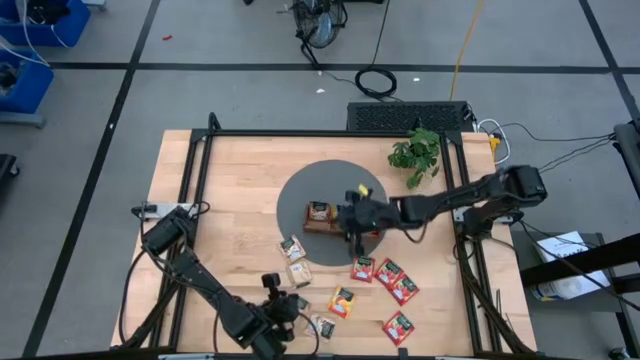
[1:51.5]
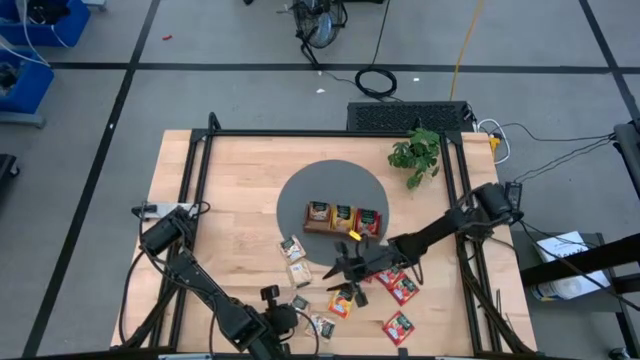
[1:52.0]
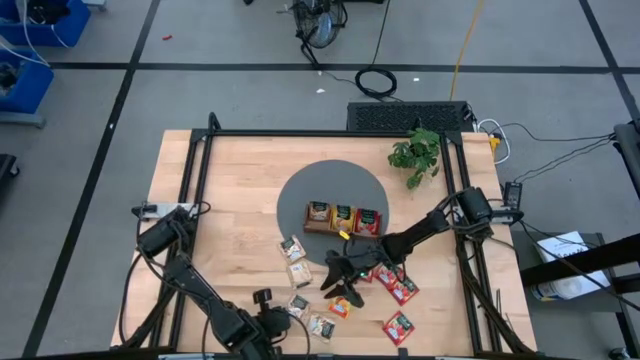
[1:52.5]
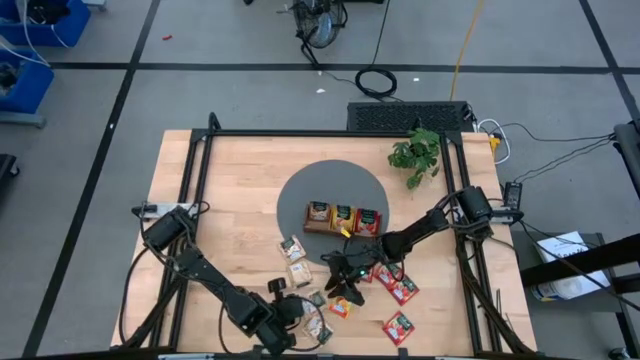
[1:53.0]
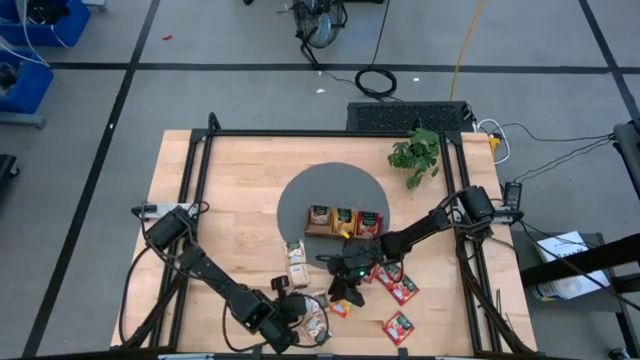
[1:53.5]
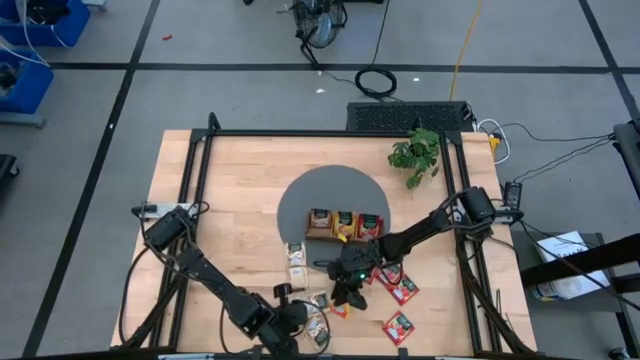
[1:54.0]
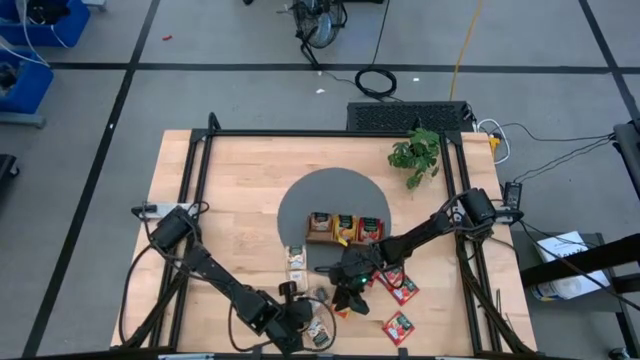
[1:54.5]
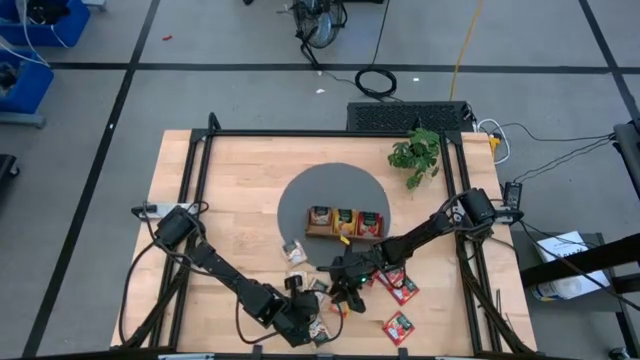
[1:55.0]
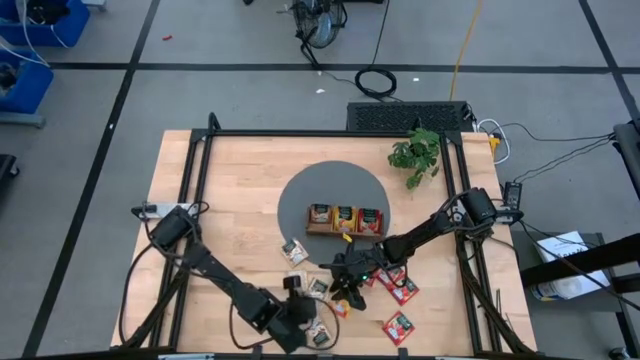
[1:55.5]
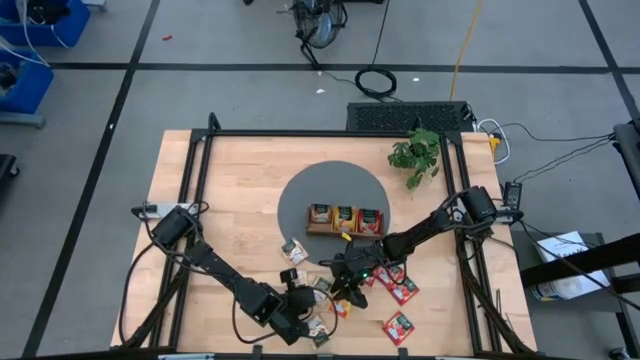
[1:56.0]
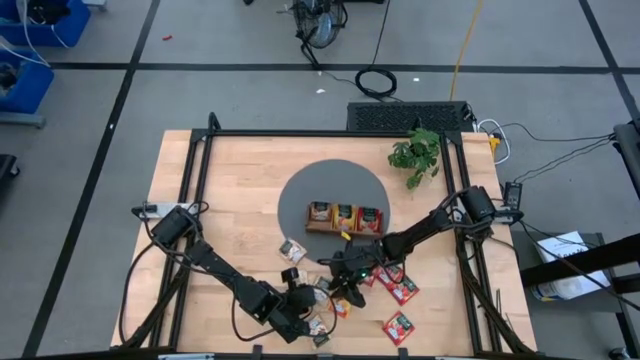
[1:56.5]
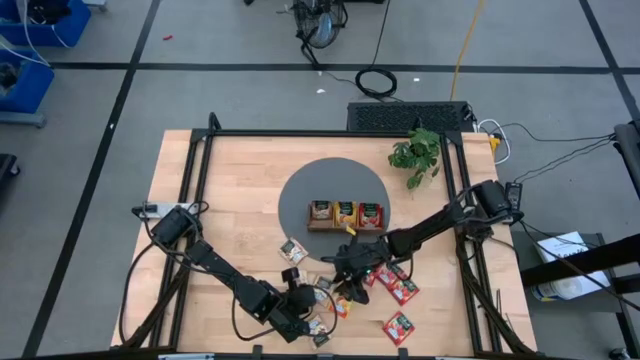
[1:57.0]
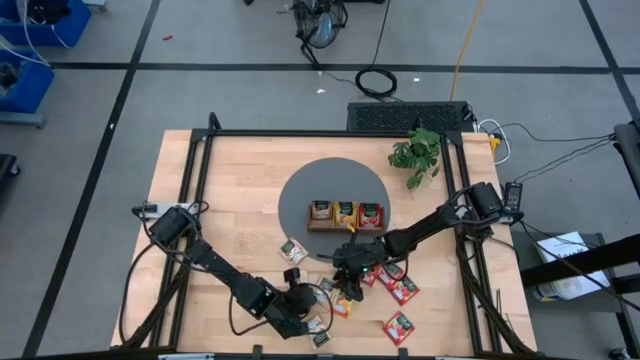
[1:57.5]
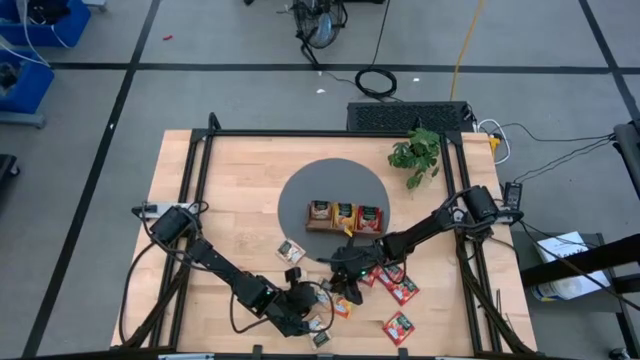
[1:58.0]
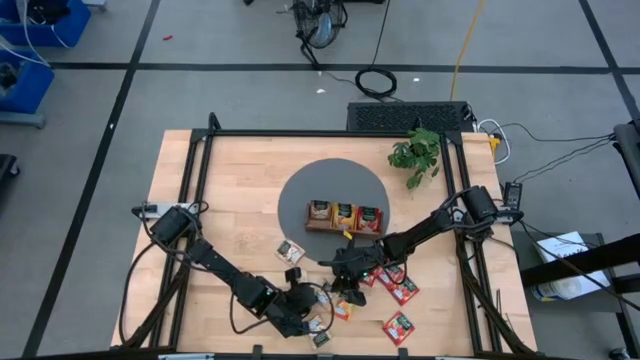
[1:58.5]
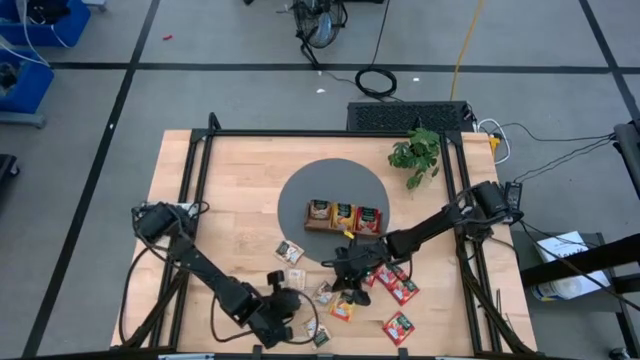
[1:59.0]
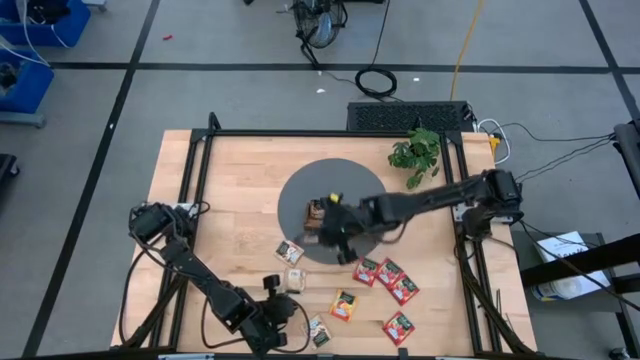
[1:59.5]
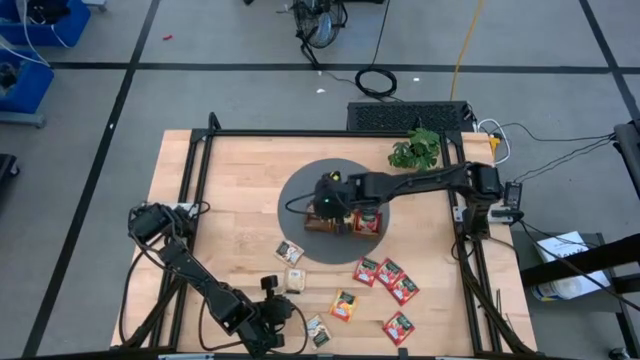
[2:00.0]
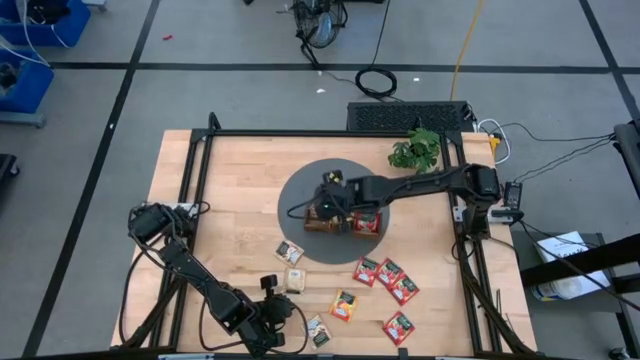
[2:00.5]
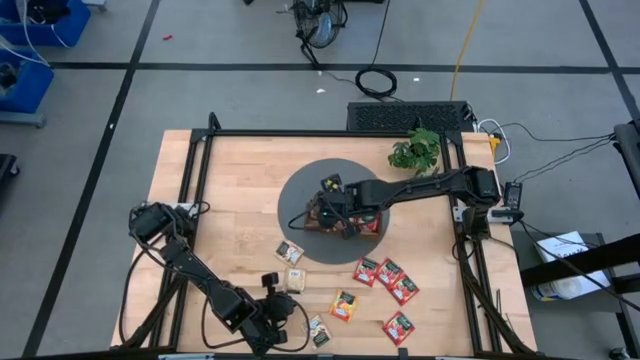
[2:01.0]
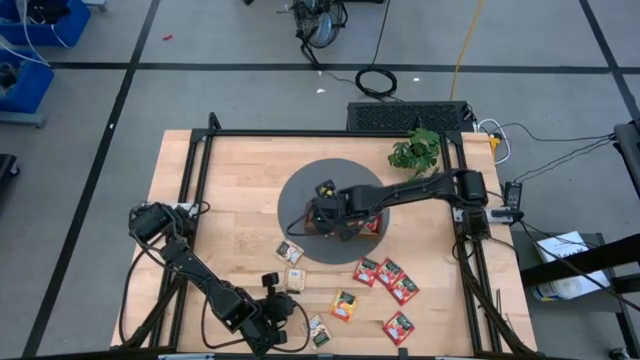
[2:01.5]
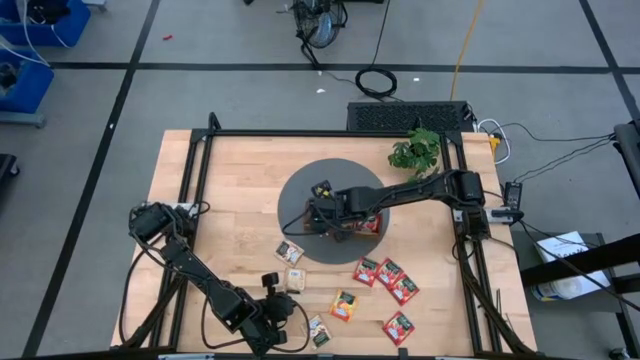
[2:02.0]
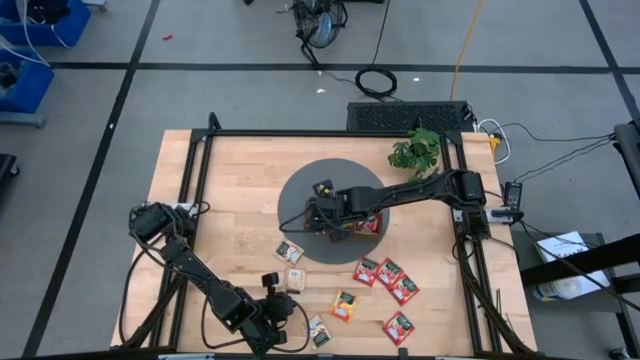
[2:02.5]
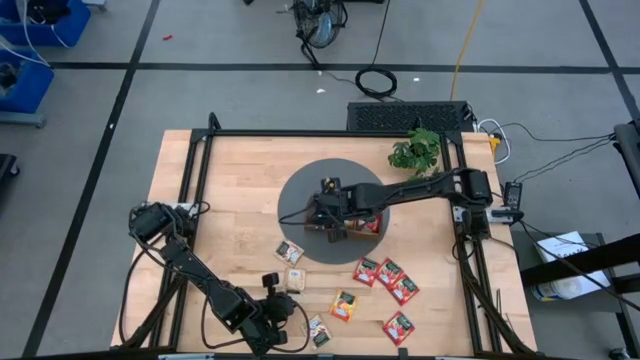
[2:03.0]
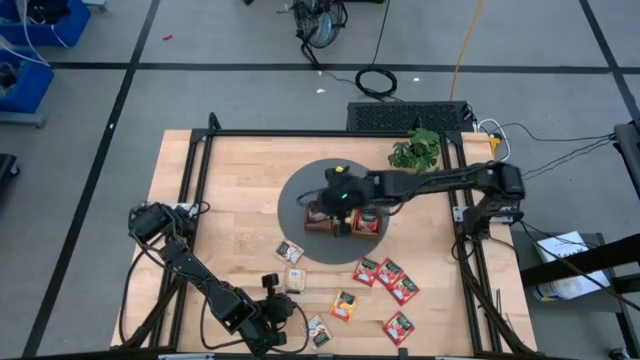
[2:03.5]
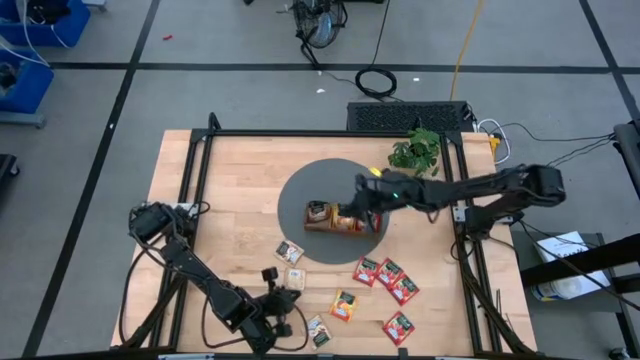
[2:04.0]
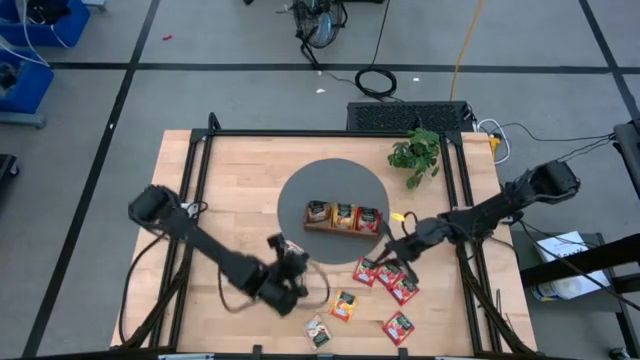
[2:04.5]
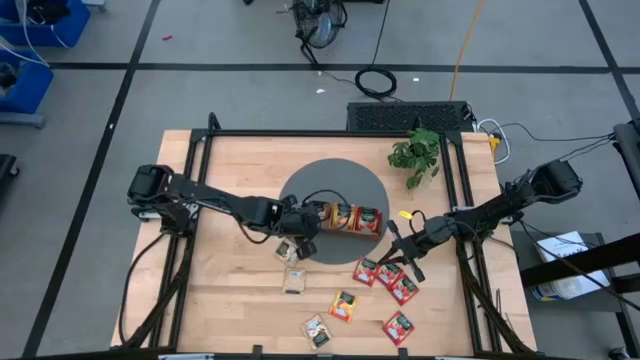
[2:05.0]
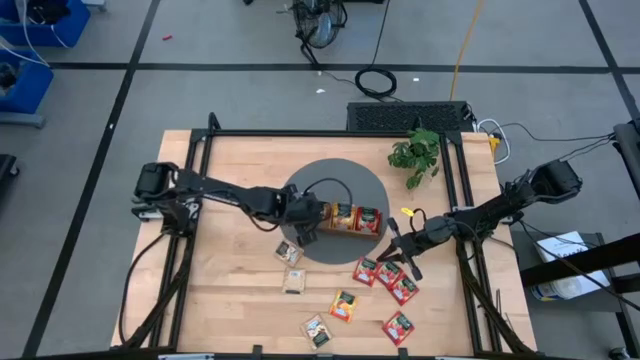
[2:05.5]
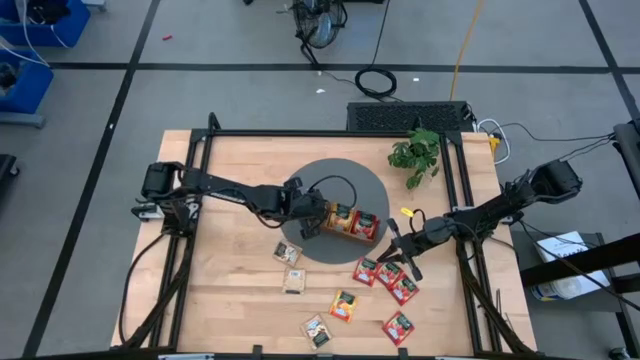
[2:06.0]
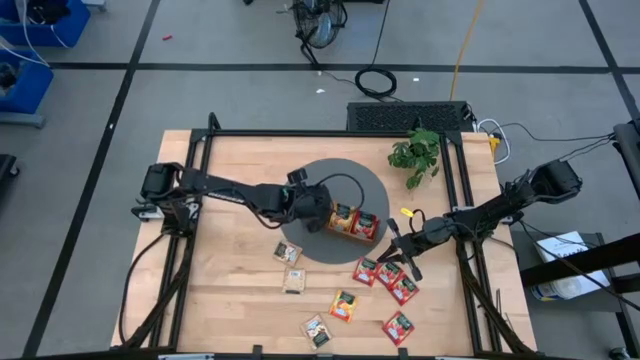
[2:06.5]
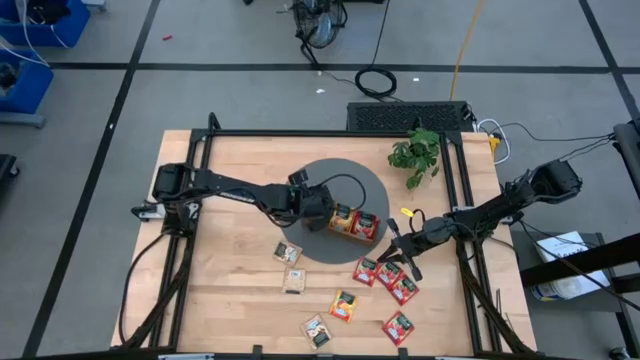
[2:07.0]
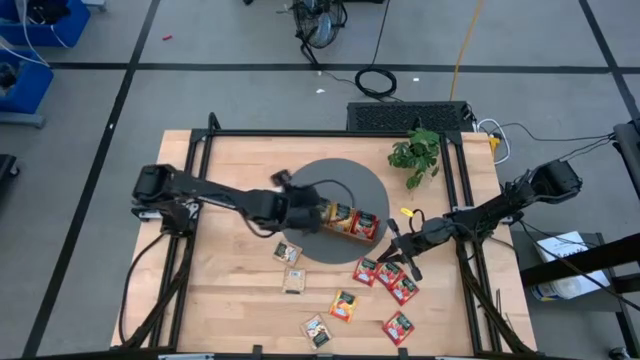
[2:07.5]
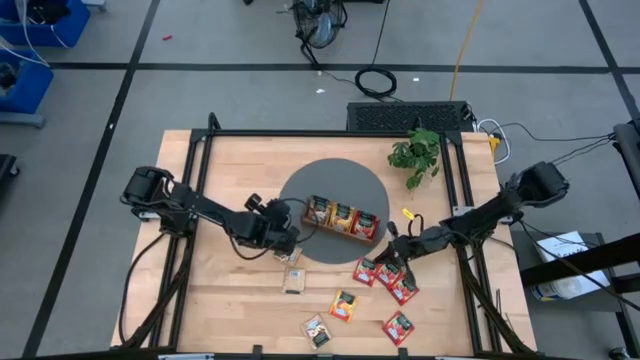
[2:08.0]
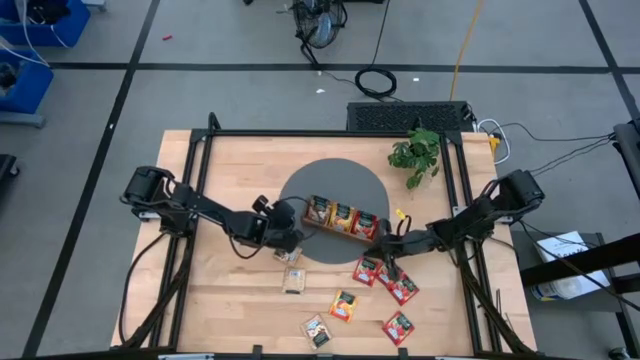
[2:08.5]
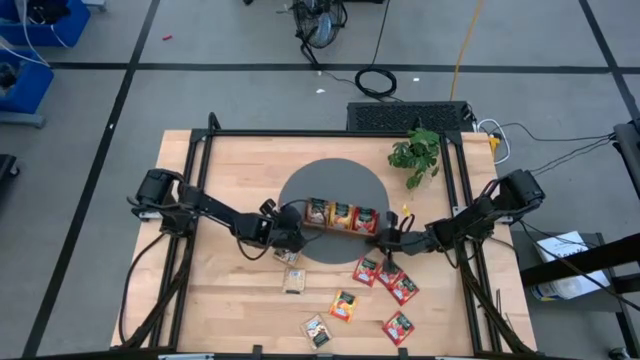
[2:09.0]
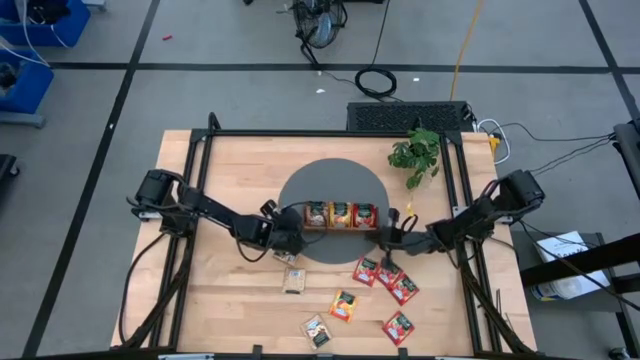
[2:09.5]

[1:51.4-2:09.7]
Task: Pick & Place Tea
Put the brown tea bag into the left section of the wooden organizer

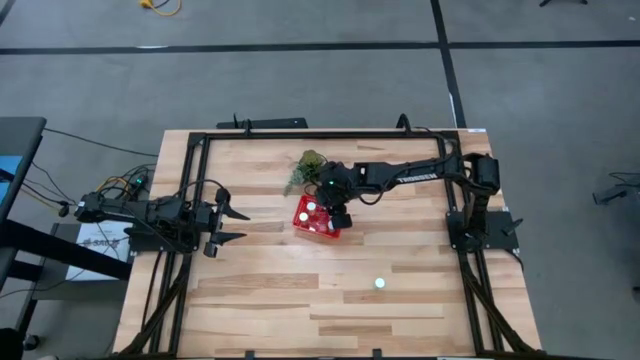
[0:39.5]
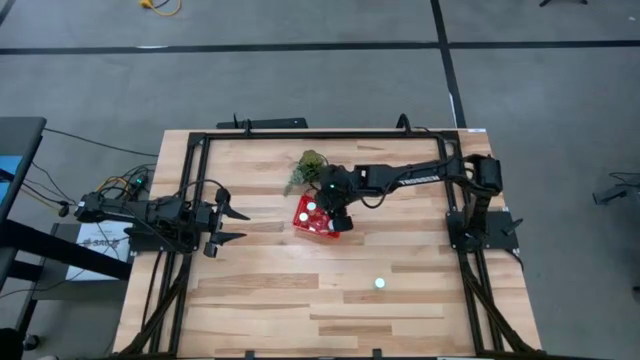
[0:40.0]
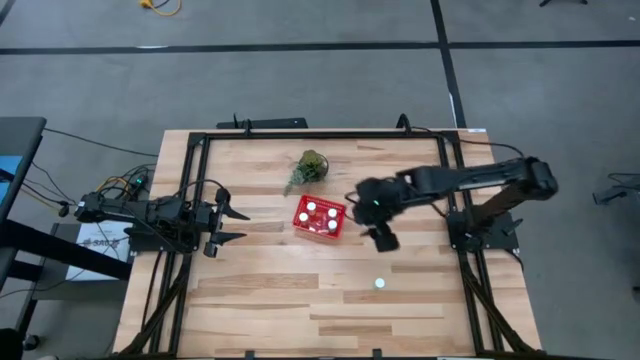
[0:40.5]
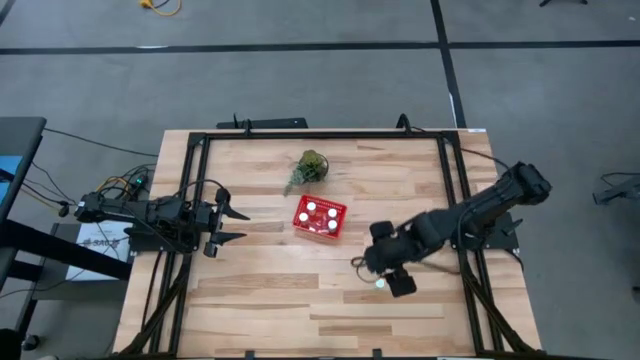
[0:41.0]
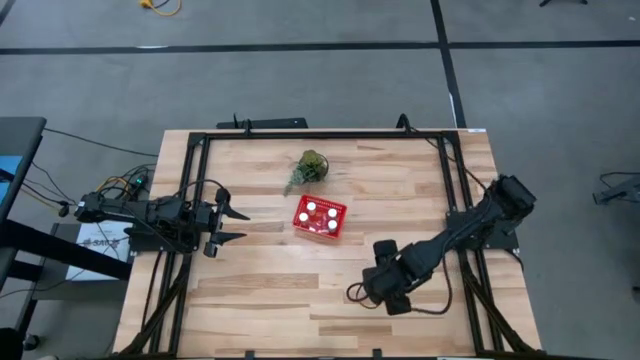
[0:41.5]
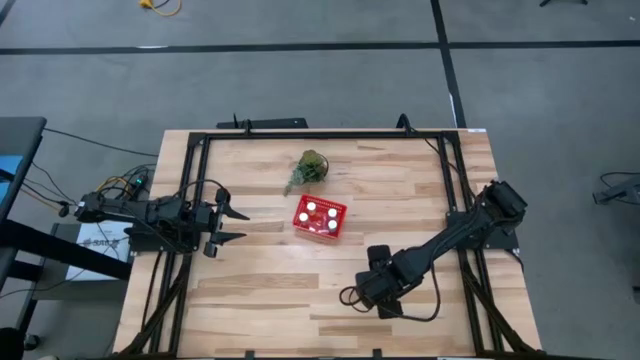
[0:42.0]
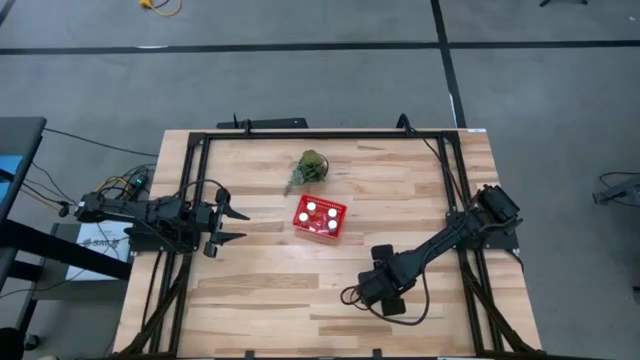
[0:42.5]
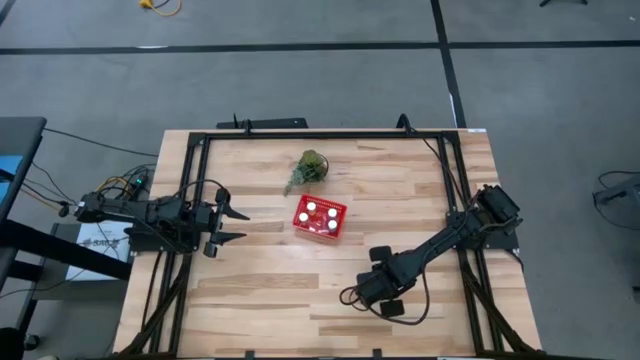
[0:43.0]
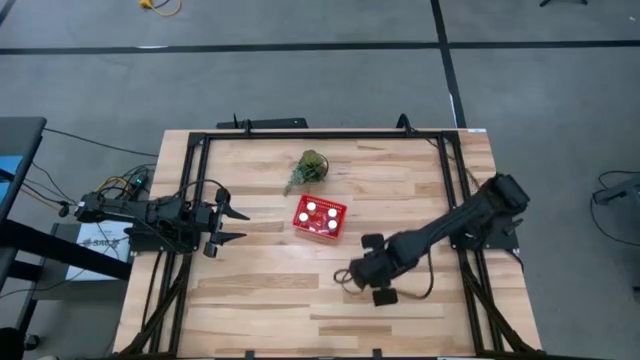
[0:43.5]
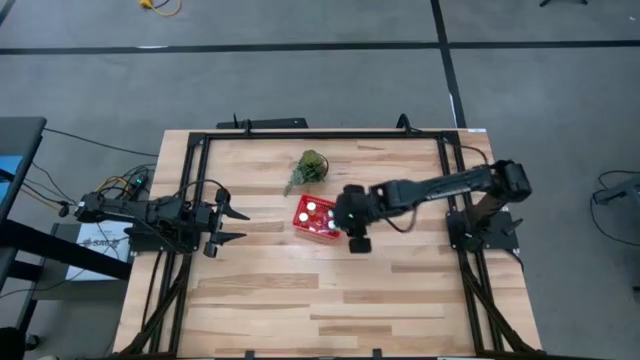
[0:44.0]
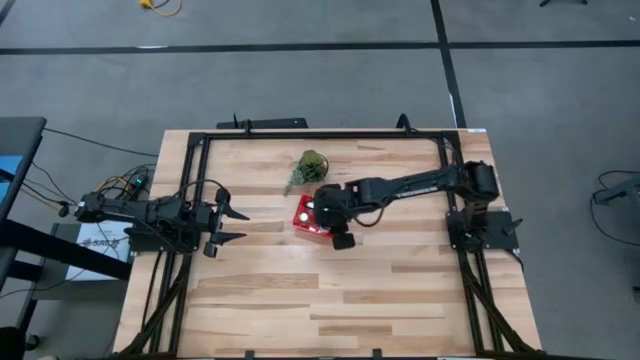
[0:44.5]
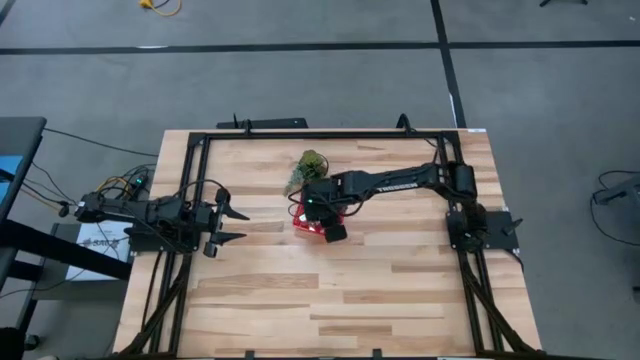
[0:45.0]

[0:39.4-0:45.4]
Task: Pick and place pill bottles into a basket
Put the blue medicine bottle into the red bin
